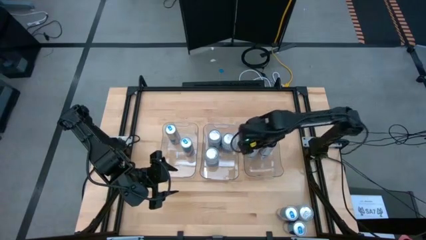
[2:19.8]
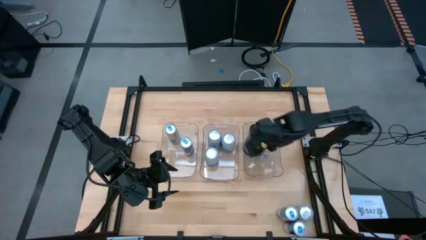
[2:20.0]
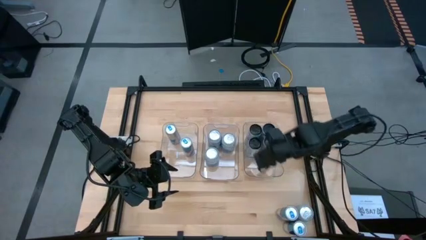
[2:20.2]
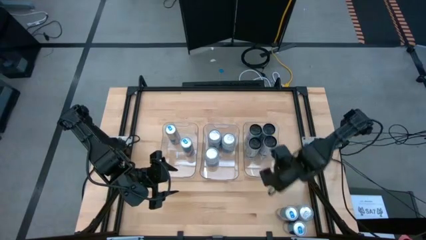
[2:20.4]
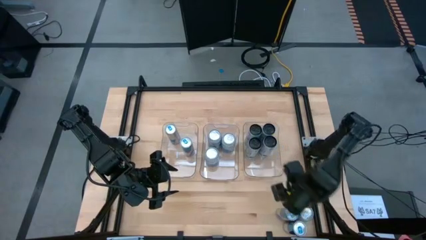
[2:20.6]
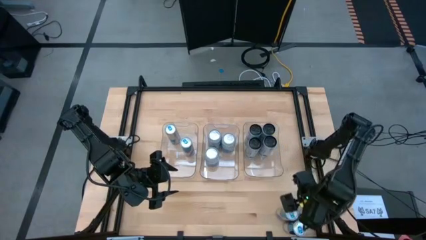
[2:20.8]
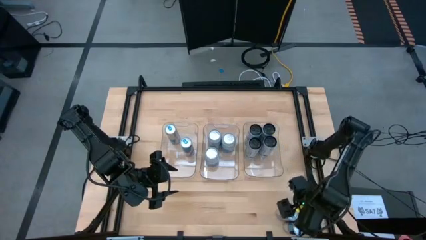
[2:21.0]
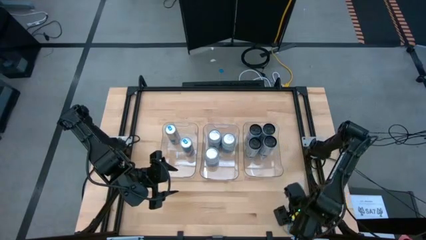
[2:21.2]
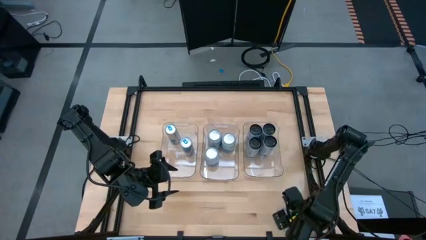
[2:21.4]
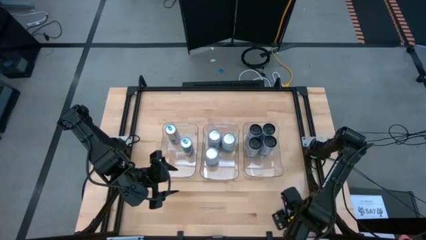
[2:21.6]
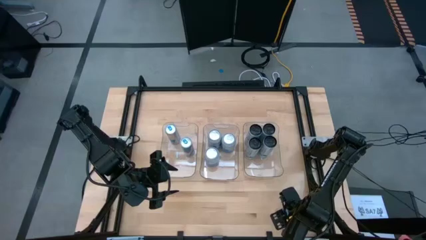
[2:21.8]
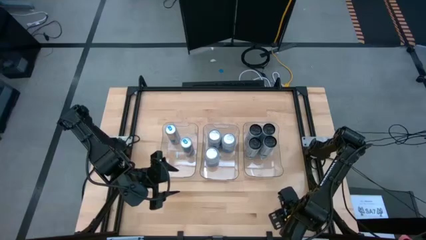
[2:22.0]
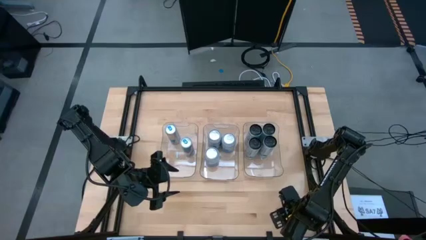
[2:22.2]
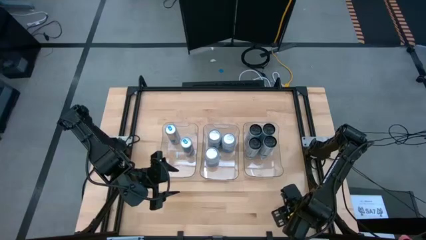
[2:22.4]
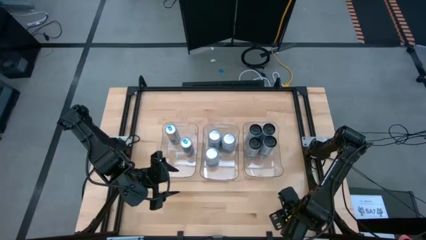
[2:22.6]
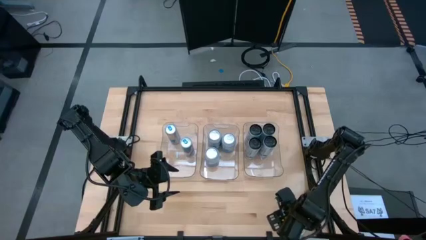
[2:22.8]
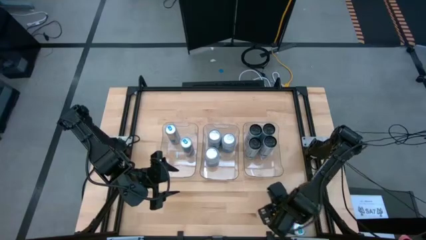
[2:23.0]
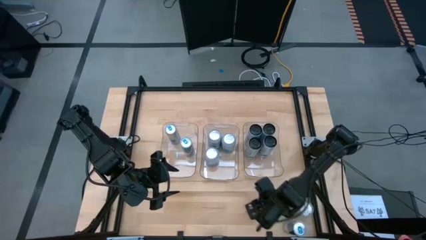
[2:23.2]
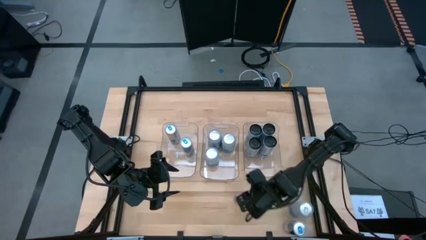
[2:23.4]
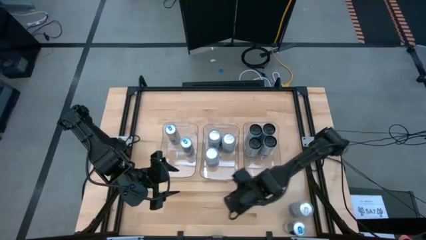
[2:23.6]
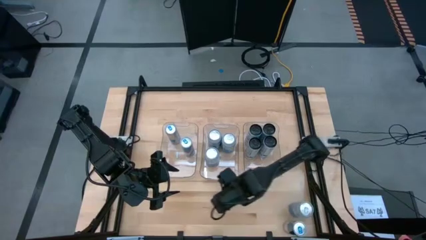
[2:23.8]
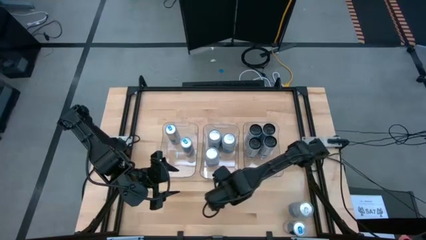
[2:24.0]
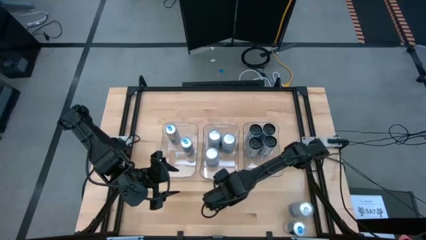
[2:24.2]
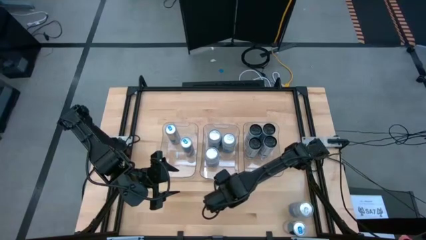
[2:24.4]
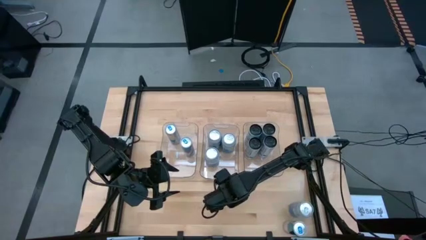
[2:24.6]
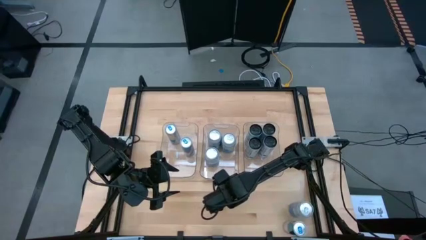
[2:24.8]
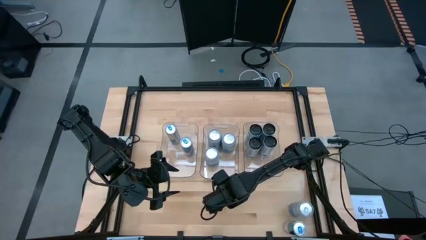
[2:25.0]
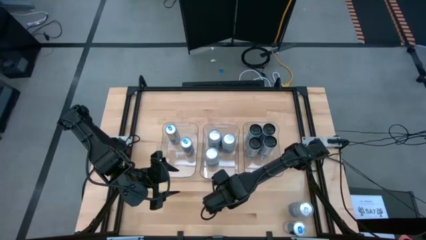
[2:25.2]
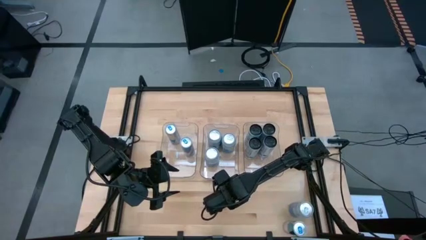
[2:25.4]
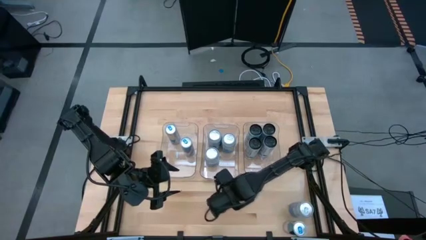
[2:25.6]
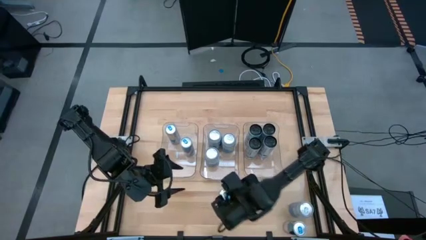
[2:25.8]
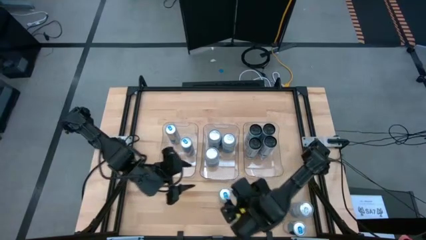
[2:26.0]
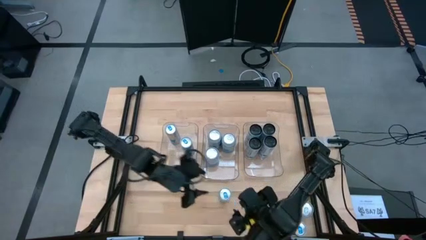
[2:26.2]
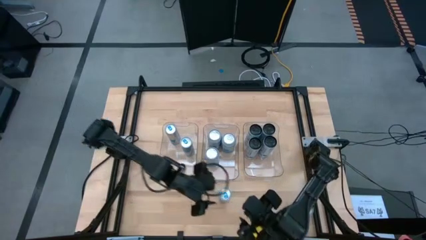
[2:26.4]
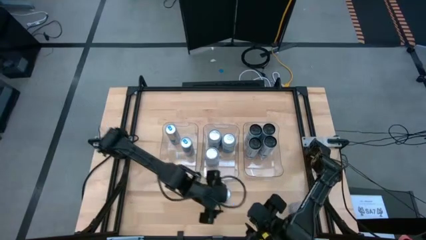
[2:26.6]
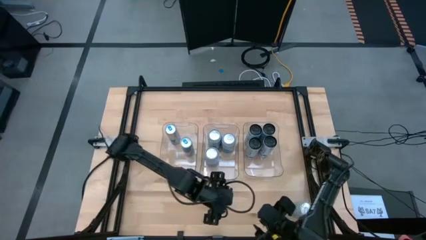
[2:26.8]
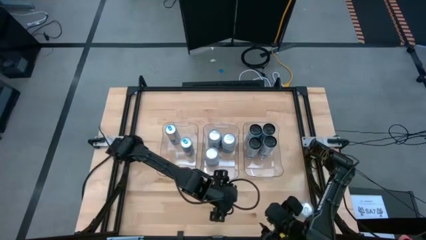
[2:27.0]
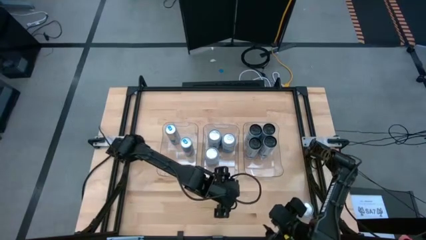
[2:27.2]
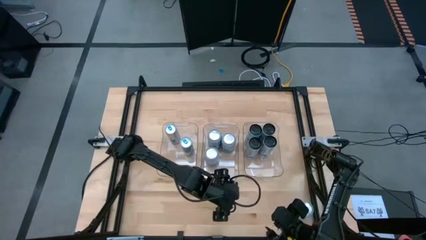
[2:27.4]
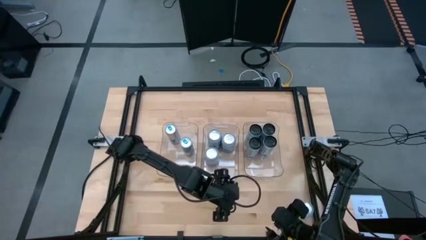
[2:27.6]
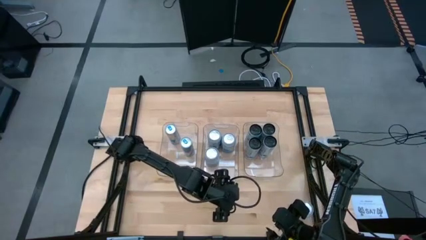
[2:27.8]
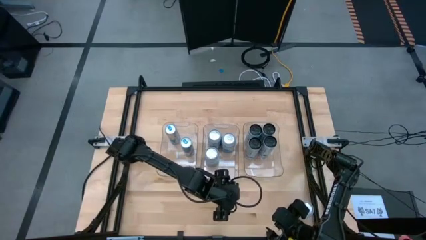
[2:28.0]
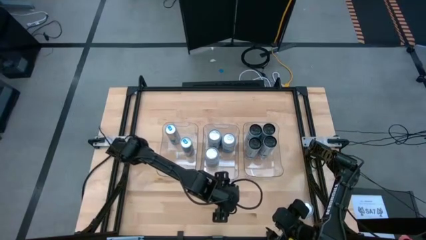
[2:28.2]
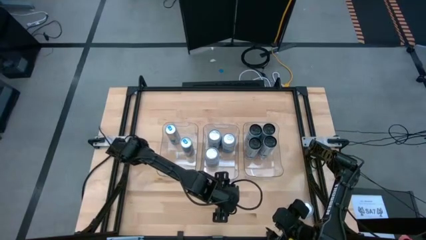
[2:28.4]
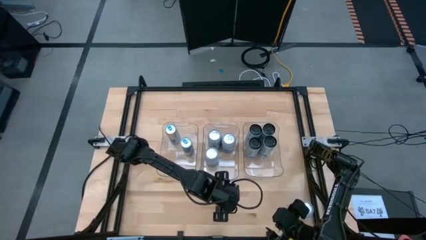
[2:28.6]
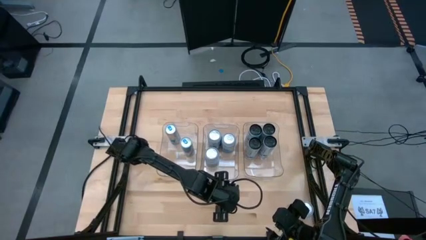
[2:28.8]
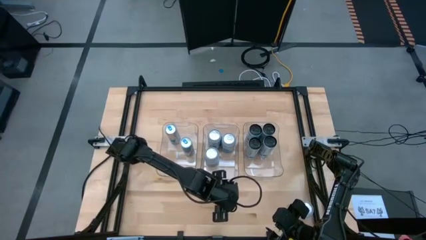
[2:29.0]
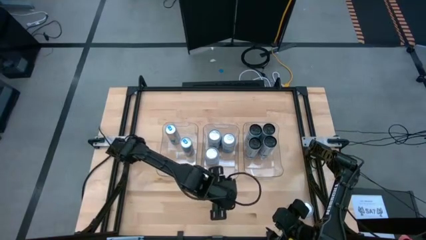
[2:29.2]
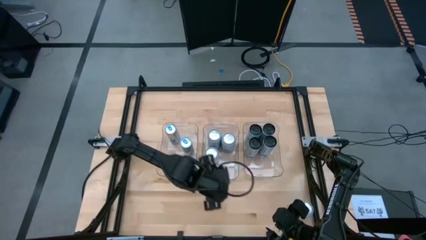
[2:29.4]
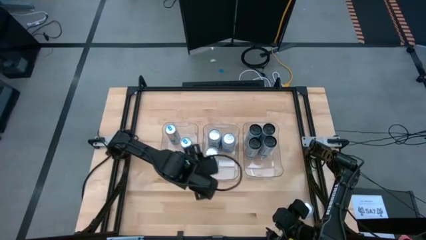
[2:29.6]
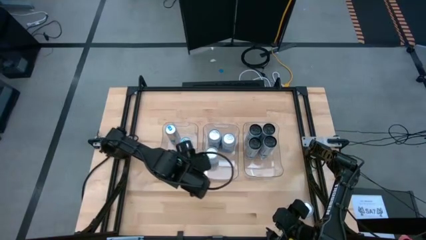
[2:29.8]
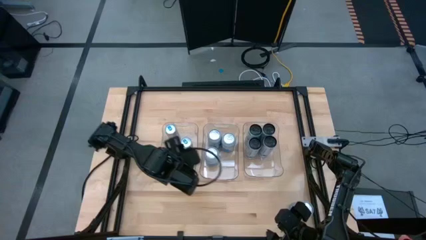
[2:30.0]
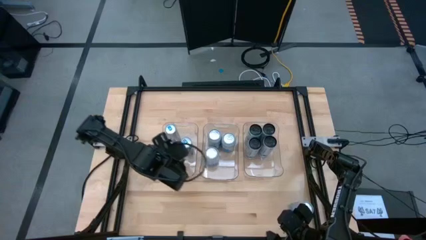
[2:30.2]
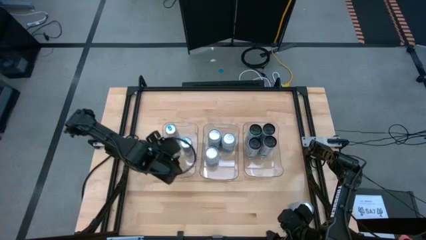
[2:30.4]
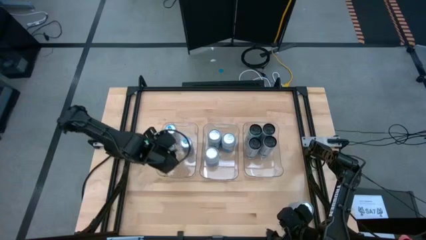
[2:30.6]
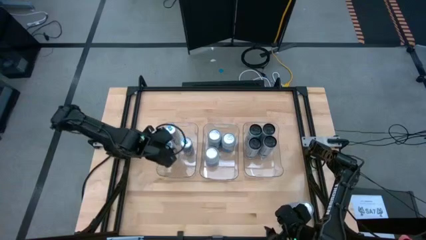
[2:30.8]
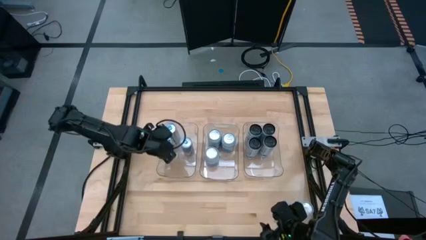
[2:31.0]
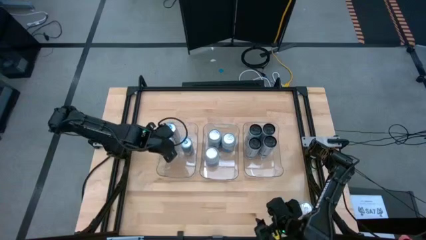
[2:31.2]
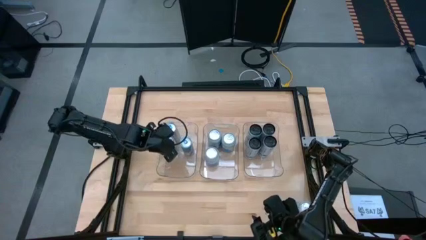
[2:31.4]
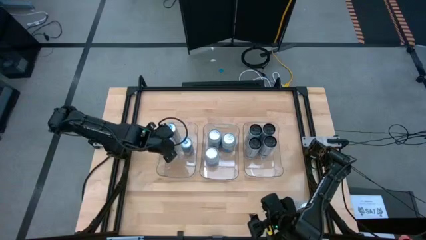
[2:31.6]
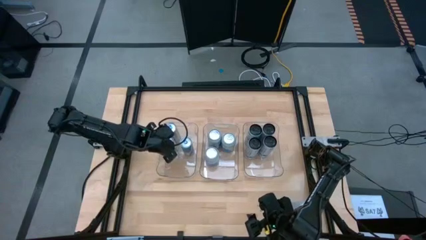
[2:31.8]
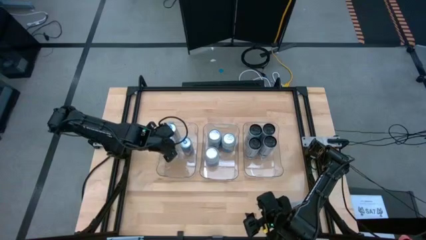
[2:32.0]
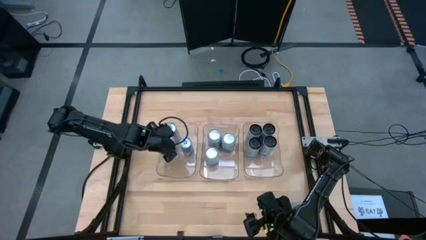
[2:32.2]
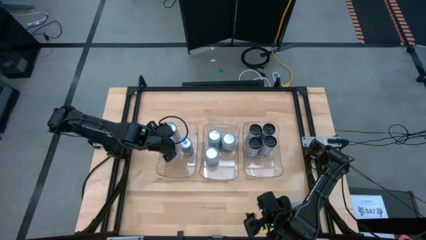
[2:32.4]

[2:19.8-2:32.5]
Task: Sort soda cans
Put the top blue soda can in the left transparent bin

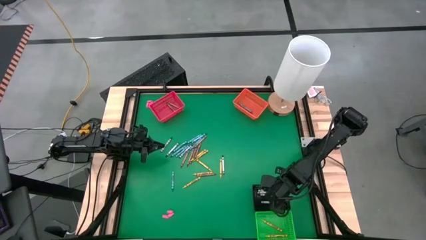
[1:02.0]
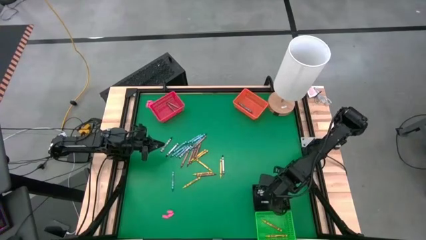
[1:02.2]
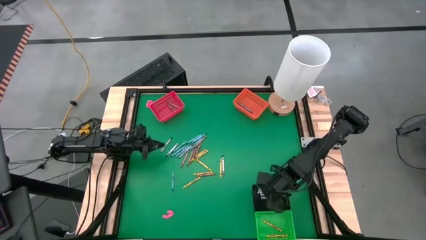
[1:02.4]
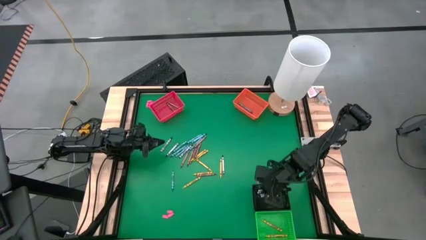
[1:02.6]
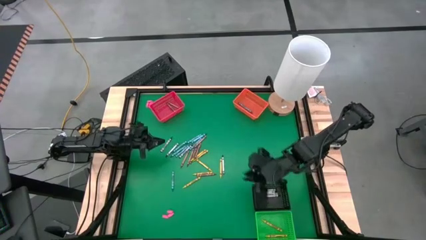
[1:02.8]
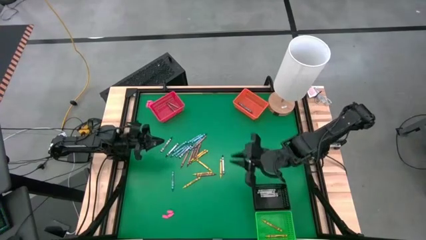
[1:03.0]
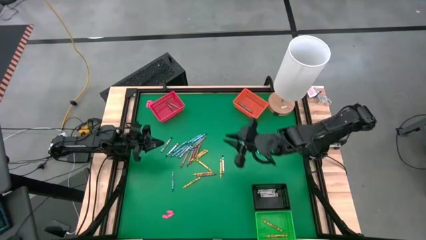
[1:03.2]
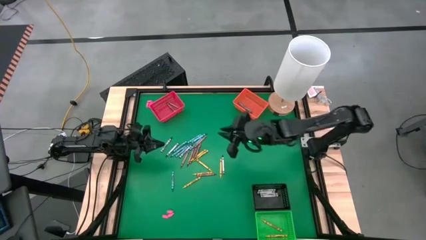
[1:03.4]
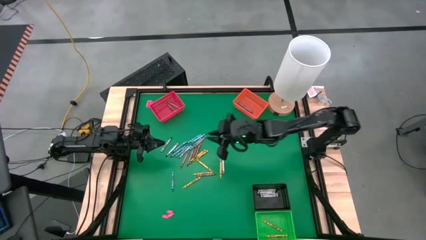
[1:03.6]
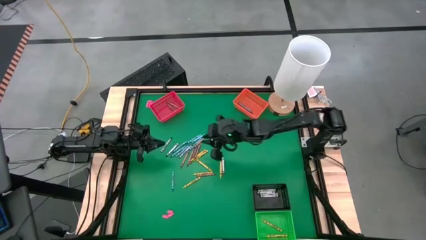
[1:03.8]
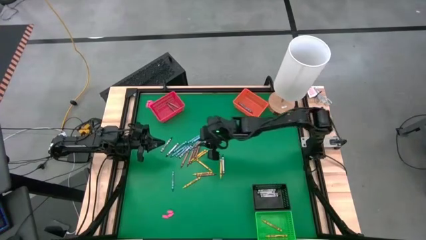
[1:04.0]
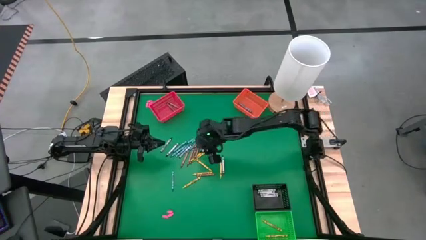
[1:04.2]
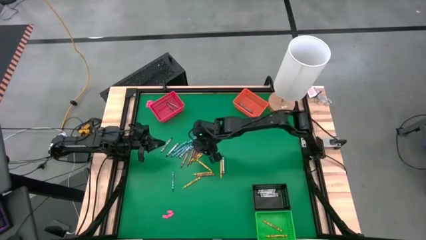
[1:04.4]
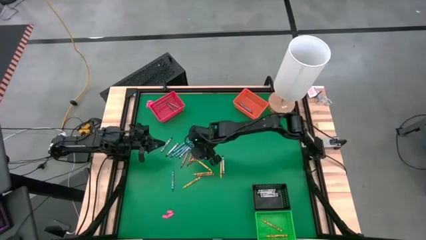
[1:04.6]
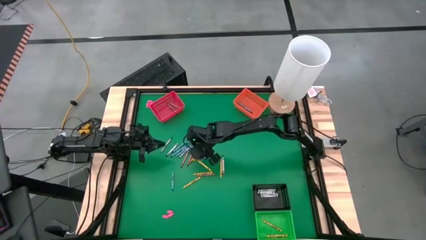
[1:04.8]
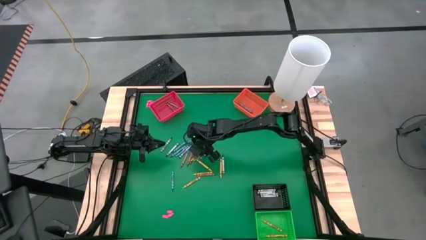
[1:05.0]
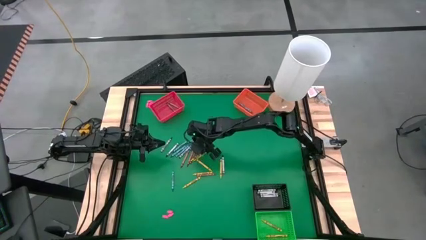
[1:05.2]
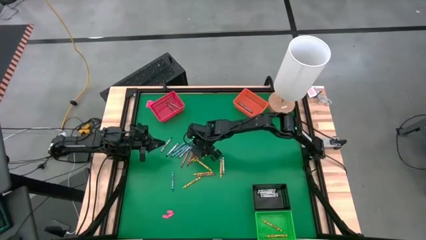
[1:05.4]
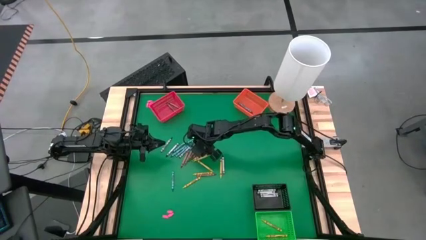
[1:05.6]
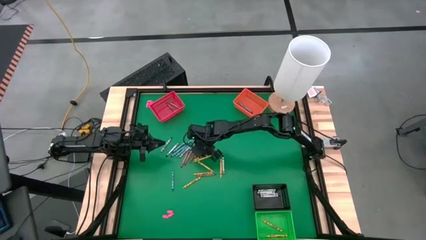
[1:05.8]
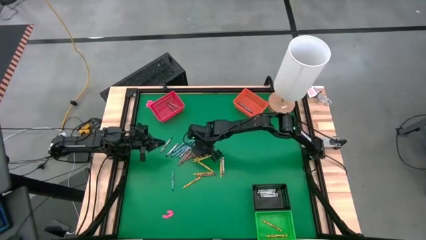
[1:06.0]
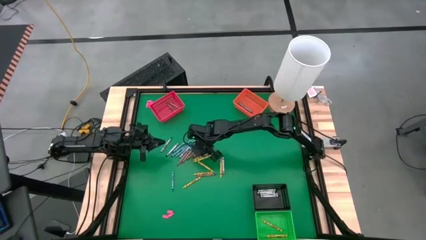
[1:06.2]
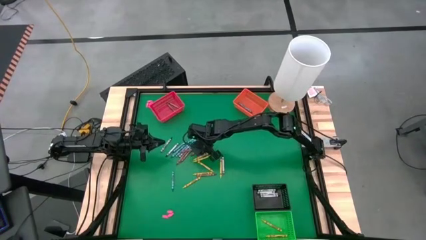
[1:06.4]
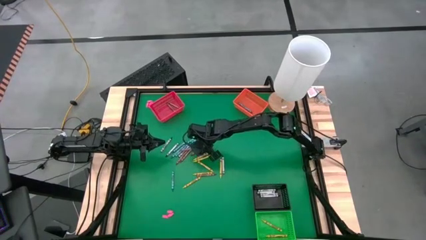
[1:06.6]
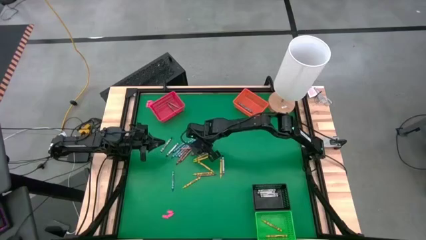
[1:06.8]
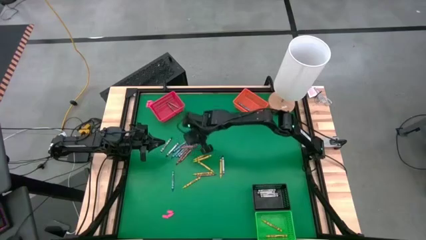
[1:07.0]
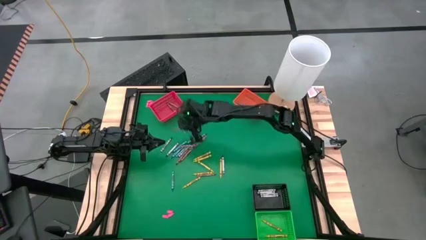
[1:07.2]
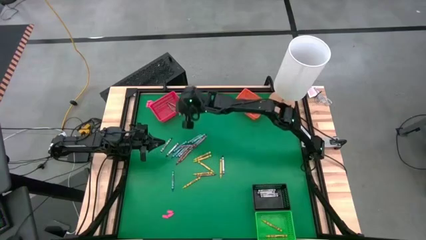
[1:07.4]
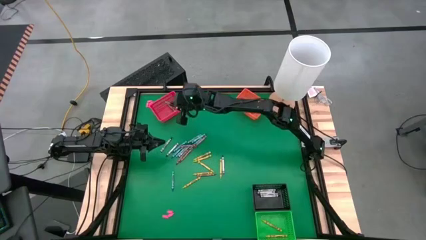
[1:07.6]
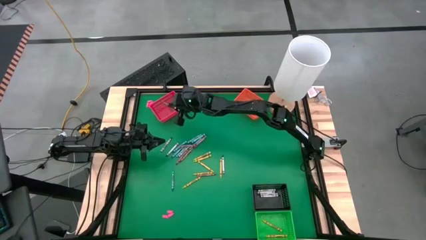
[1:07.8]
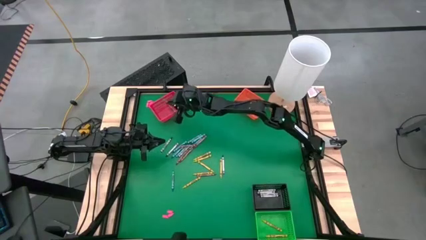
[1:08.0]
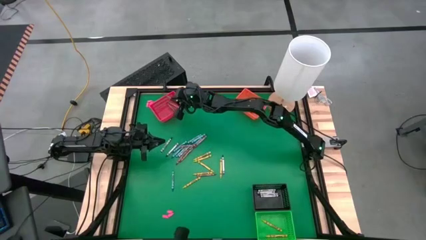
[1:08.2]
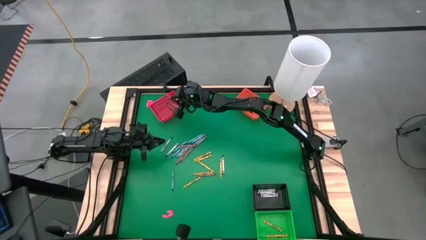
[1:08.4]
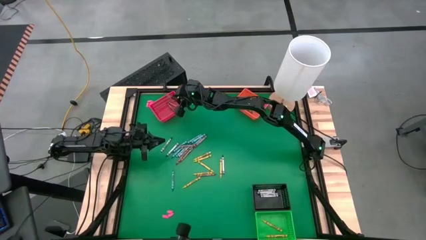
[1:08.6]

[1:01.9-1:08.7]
Task: Sort crayons
Put the brown crayon into the red bin
